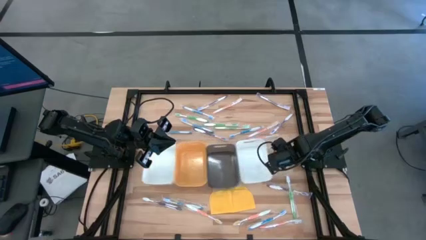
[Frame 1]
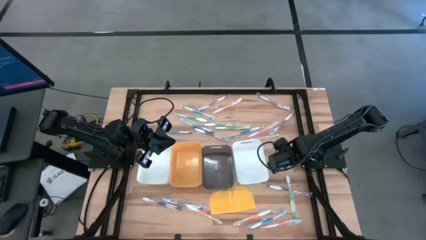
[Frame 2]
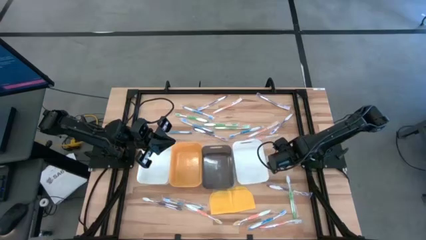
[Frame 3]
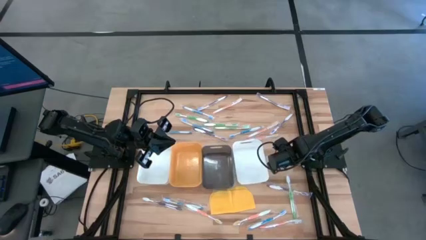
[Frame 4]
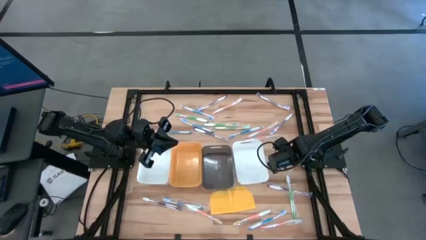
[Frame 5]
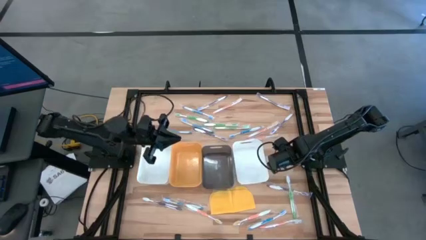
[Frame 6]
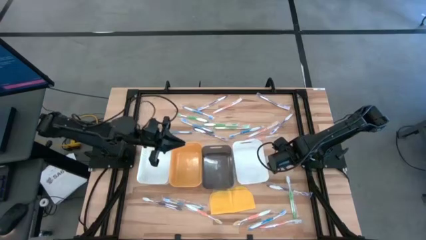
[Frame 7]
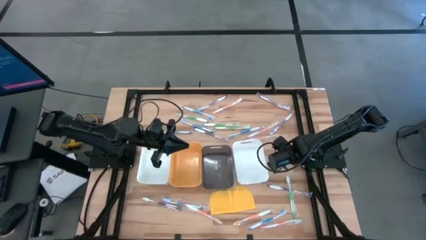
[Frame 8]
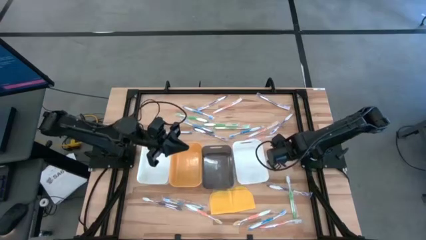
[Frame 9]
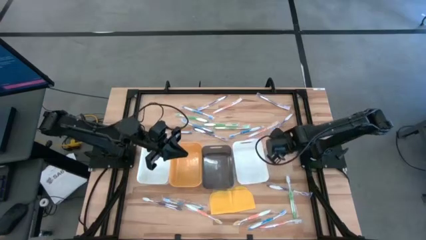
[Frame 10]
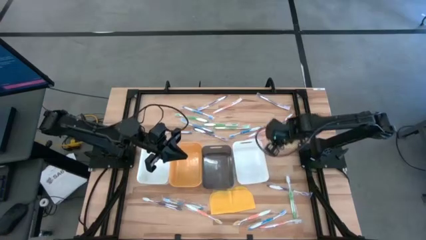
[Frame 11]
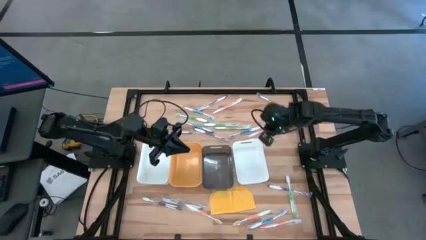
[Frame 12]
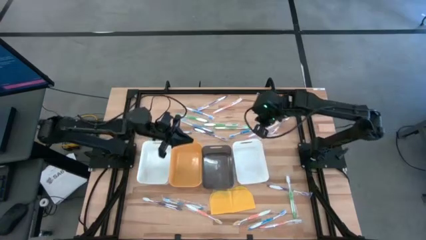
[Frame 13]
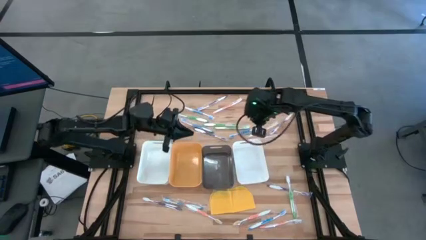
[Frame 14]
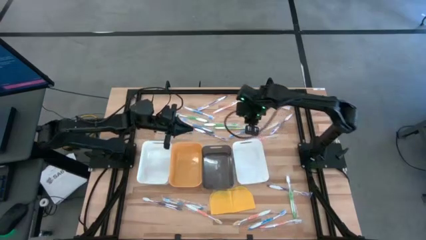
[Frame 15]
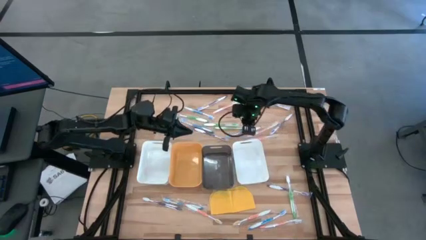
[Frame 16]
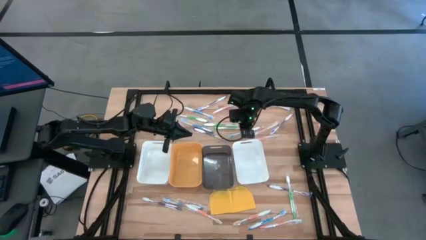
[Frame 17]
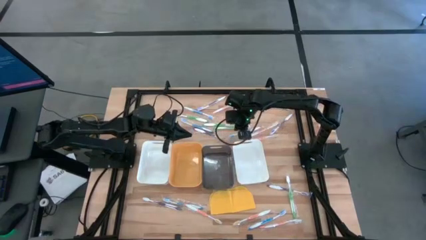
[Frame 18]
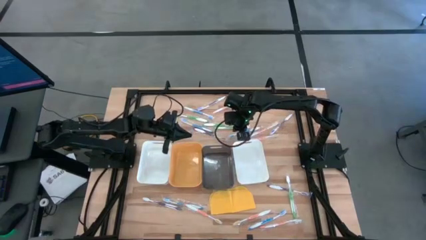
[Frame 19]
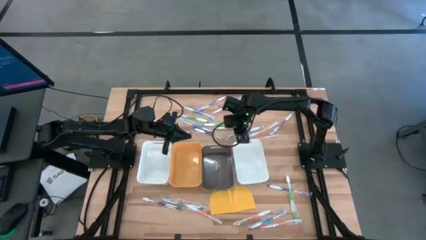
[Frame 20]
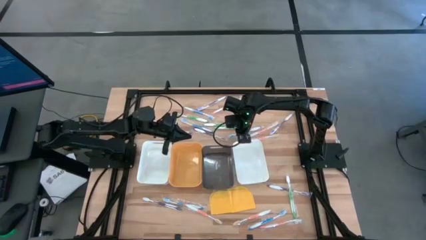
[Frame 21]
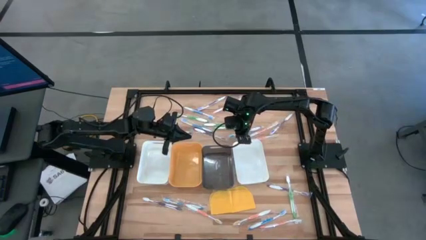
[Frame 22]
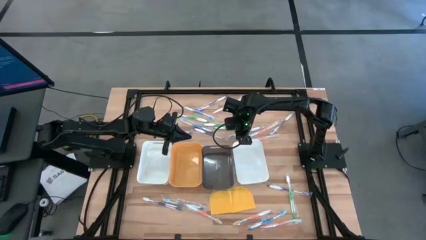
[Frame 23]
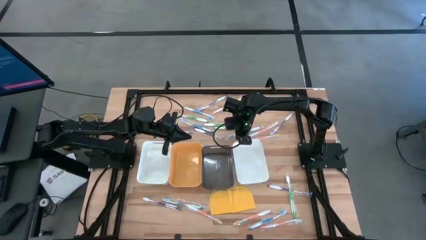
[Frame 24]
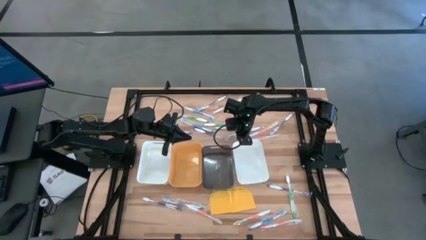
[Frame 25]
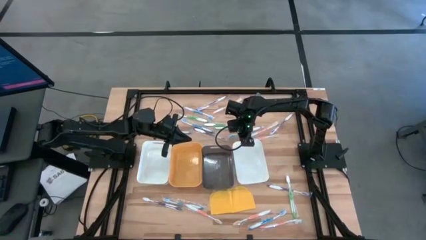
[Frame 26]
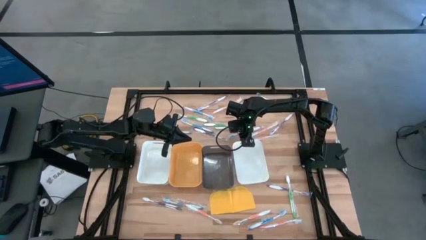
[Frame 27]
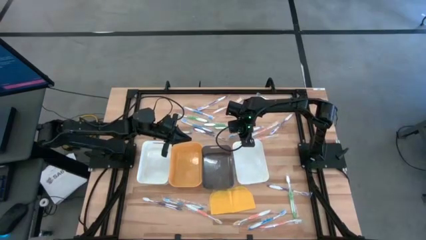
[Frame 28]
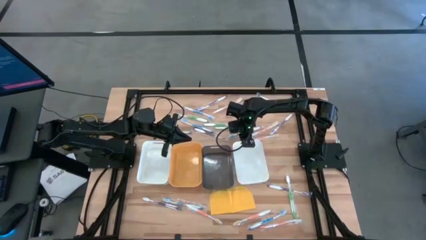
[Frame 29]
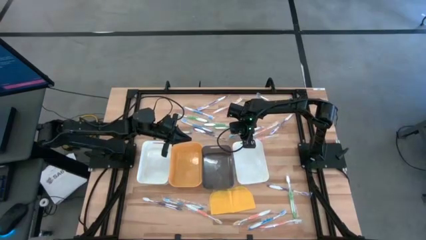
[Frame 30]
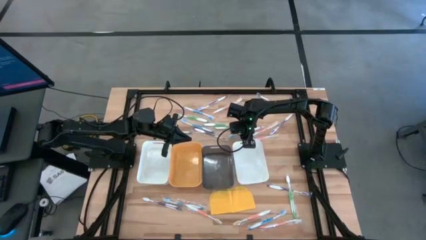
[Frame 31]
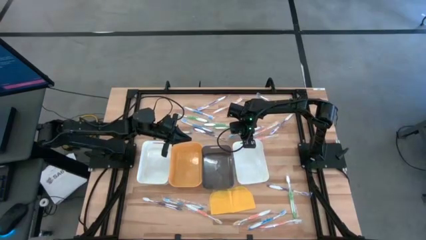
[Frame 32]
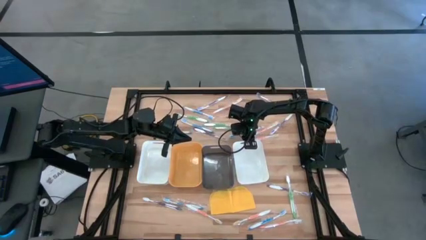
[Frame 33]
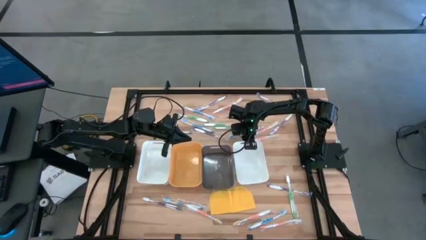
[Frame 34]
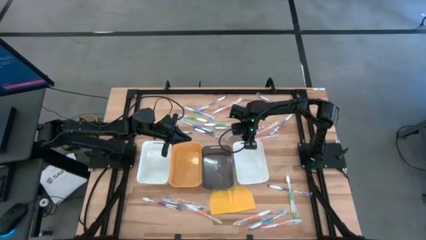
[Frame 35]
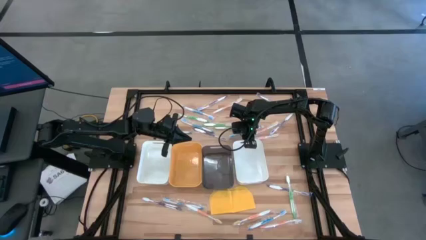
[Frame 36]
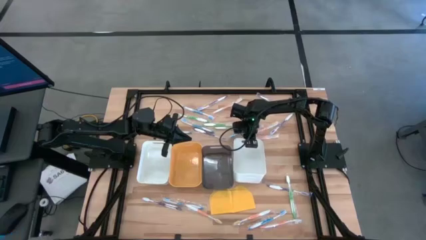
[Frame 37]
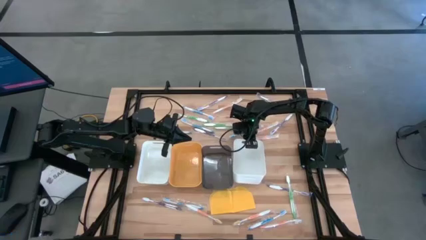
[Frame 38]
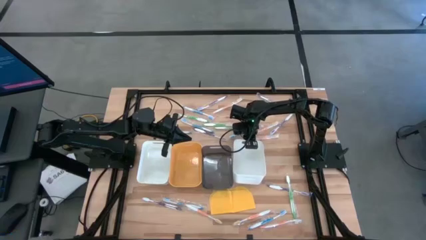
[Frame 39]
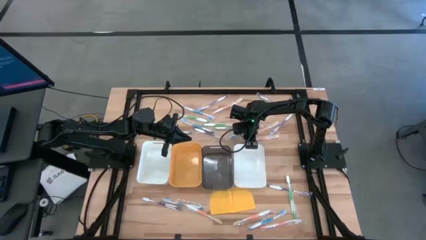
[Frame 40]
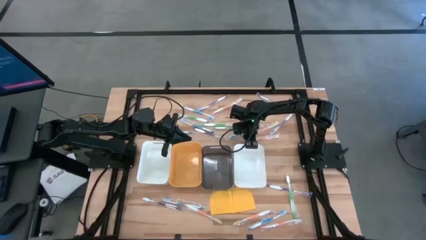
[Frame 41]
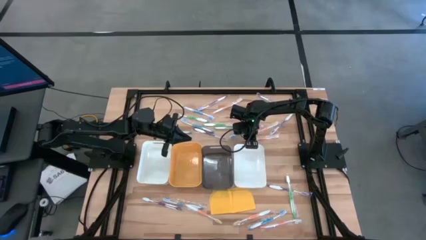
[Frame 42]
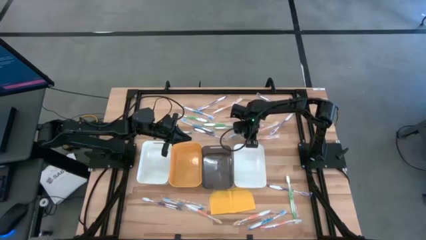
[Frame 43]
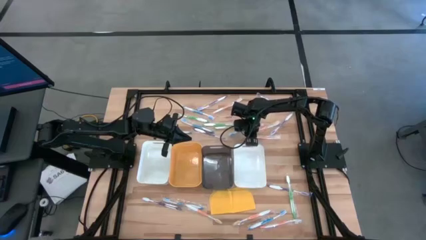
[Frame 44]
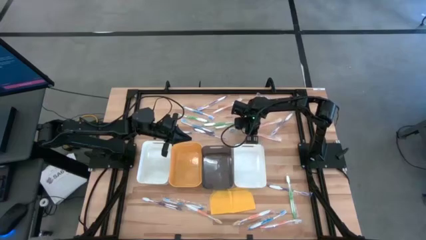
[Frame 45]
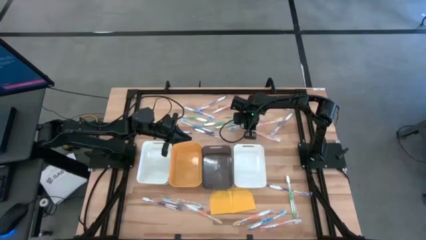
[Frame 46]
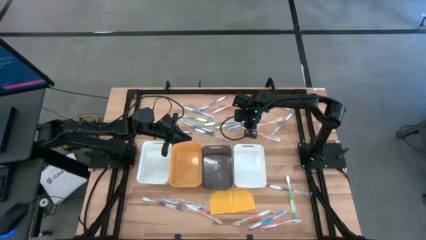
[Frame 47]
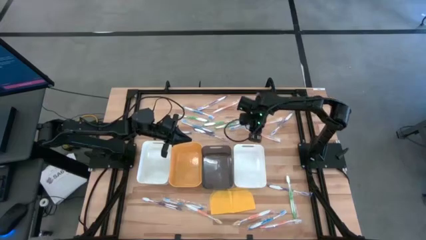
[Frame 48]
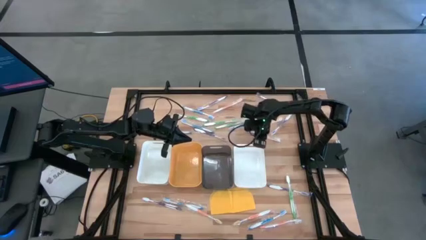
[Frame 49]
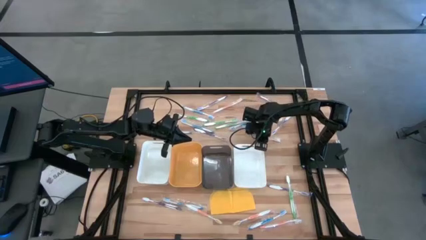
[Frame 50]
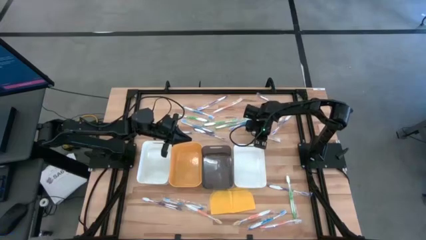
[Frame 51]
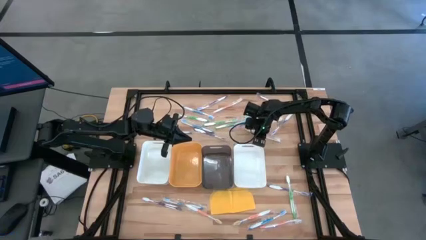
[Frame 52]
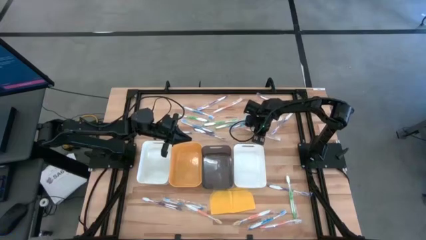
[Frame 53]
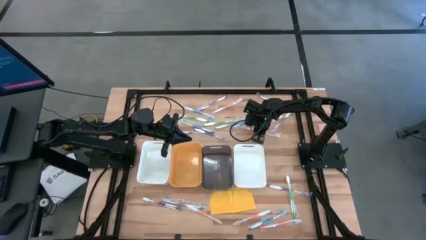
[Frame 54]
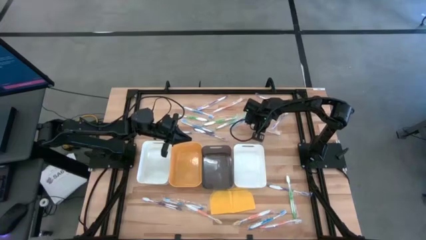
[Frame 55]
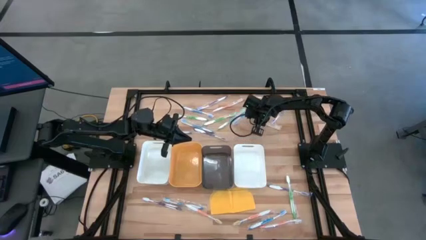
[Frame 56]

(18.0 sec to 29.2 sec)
Task: Pick & Place Toothbrushes
Adjust the orange toothbrushes
